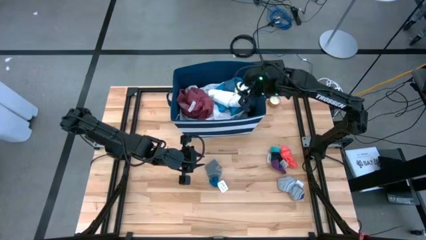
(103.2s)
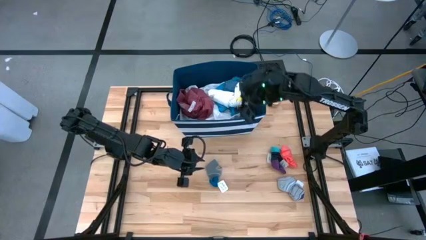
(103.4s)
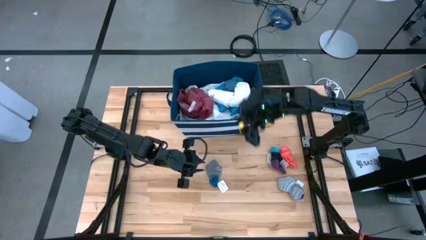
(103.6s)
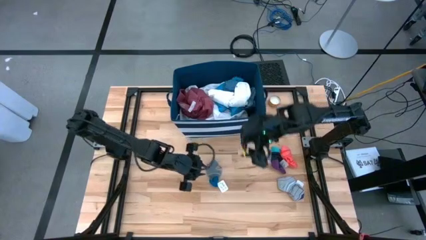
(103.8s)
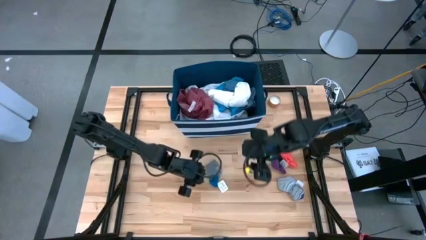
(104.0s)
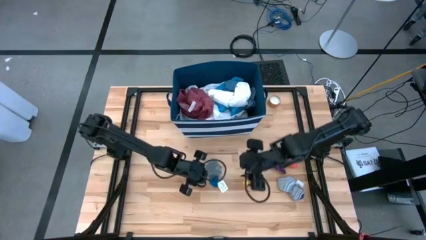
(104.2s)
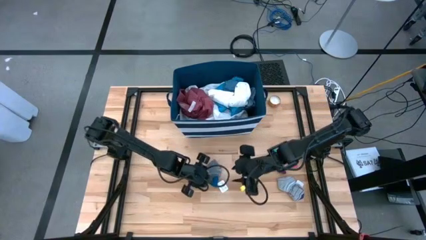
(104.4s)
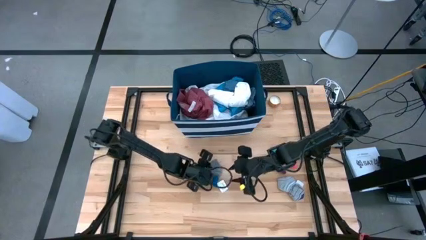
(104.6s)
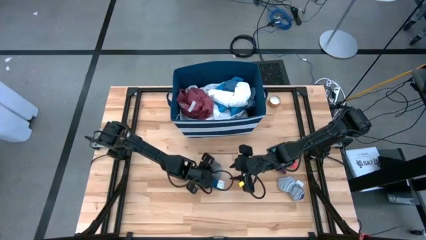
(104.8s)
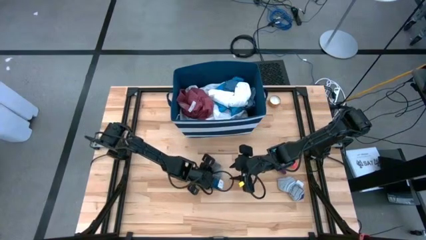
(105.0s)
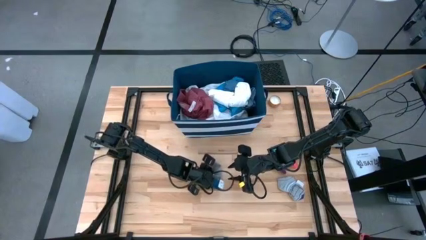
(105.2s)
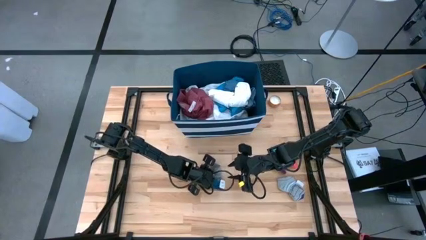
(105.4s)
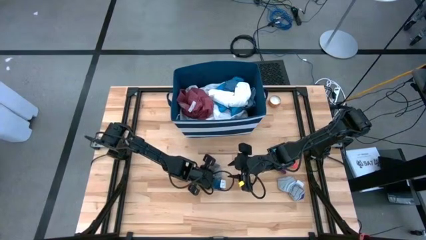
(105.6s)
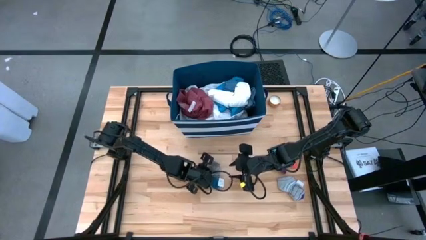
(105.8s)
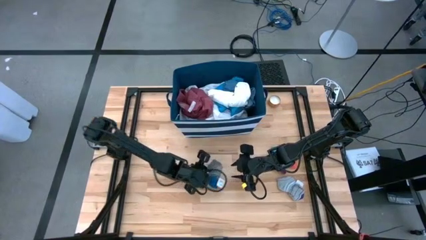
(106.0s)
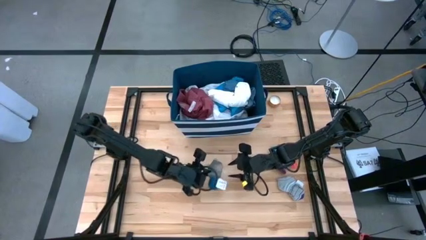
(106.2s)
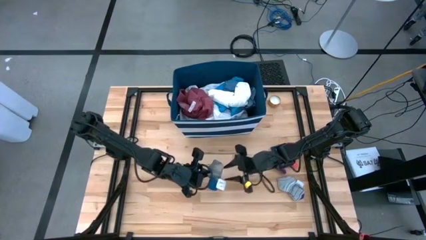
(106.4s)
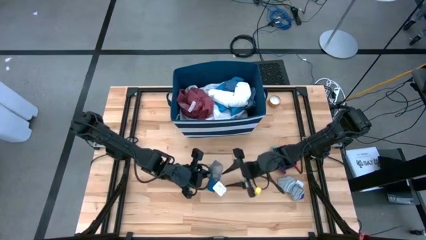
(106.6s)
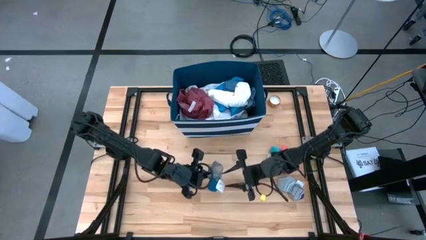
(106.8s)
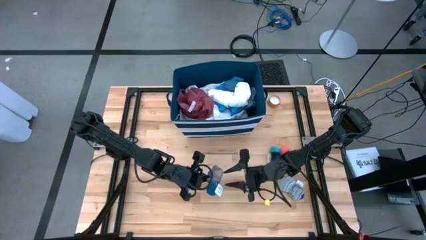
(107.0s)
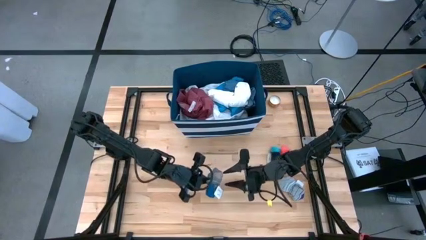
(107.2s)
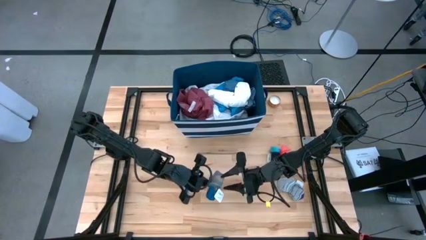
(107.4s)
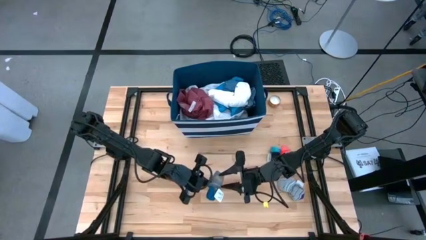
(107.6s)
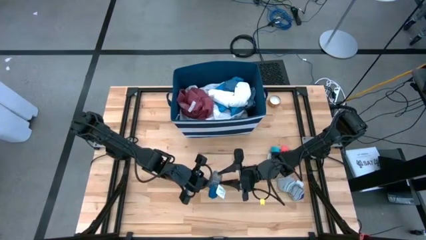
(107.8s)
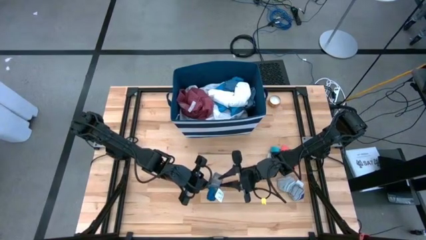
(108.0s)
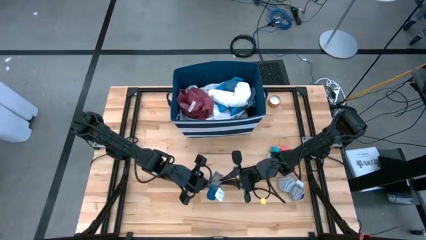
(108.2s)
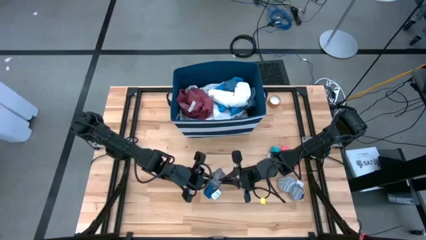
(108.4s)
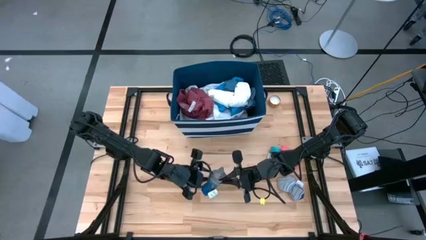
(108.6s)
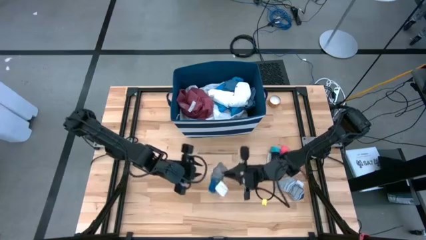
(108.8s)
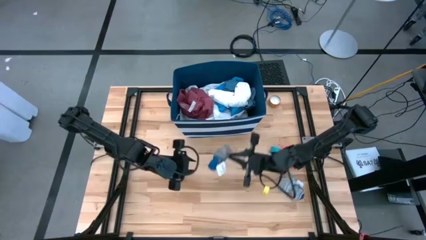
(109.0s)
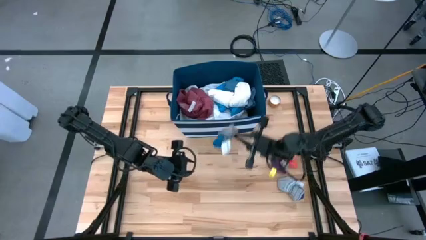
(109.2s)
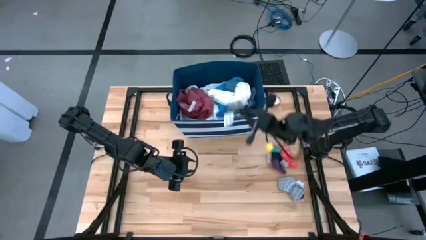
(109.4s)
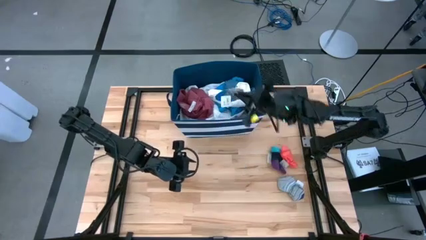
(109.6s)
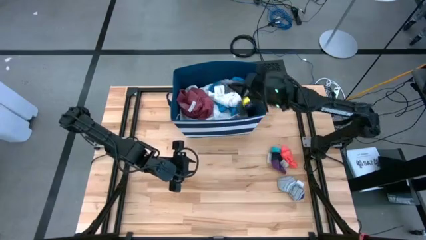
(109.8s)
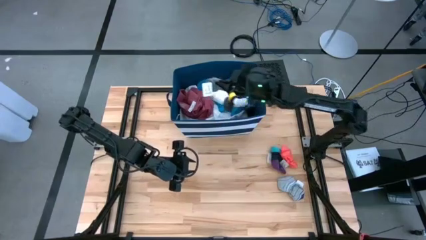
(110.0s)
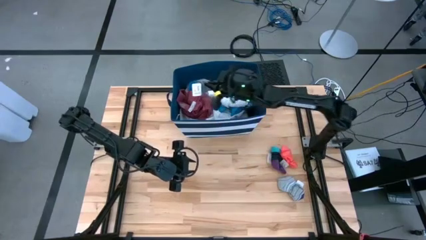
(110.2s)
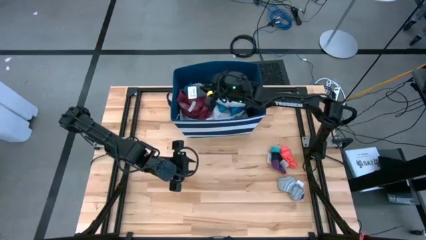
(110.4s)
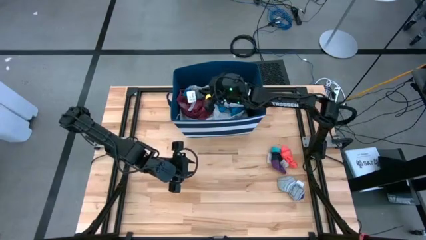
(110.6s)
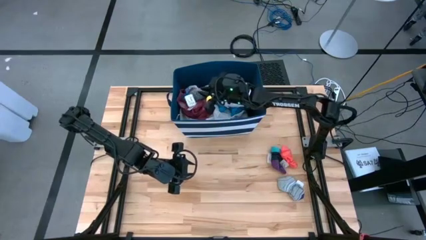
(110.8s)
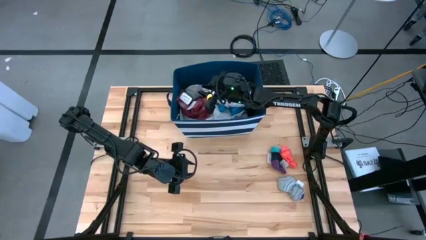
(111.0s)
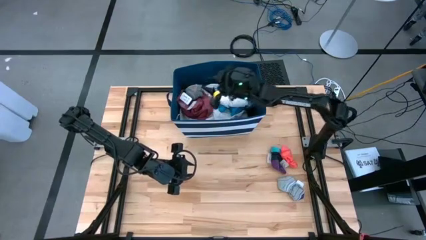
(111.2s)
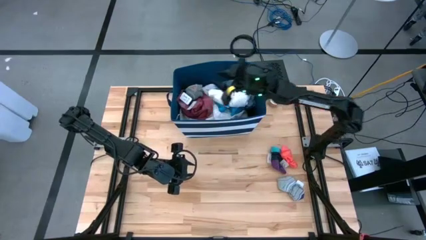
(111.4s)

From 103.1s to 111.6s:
Task: Sort clothes
Put the blue sock into the blue bin

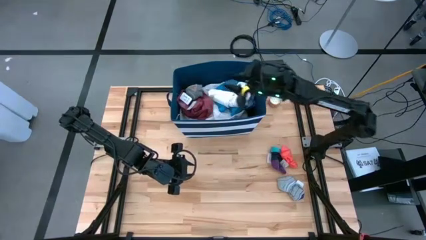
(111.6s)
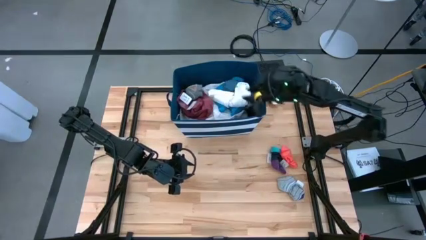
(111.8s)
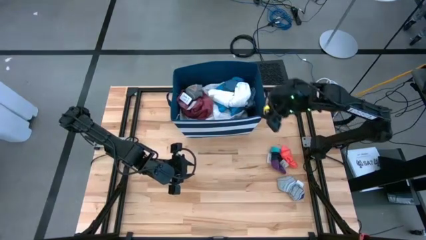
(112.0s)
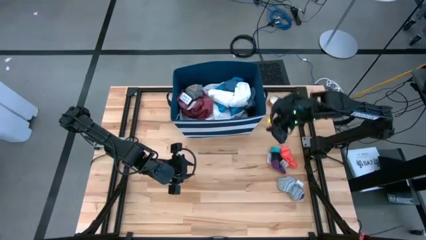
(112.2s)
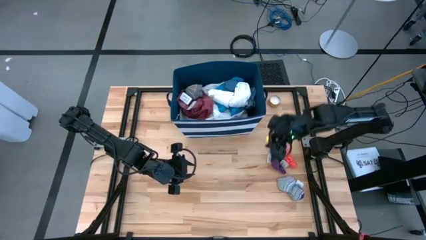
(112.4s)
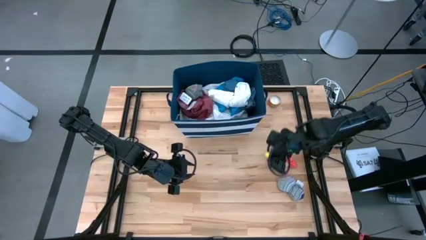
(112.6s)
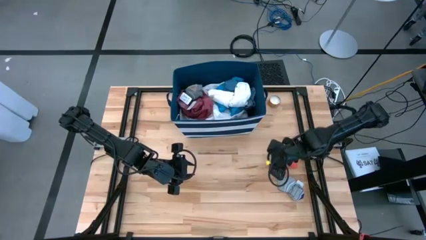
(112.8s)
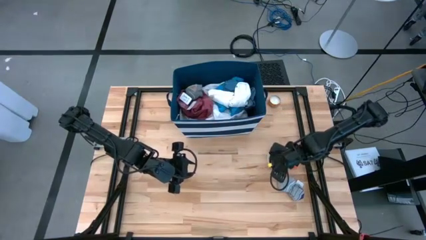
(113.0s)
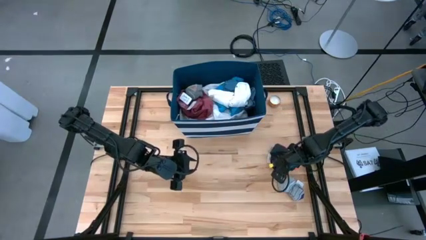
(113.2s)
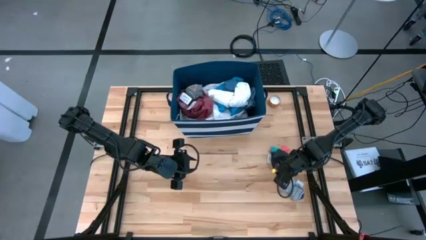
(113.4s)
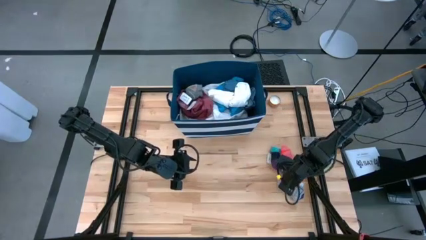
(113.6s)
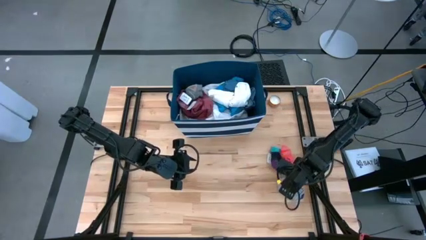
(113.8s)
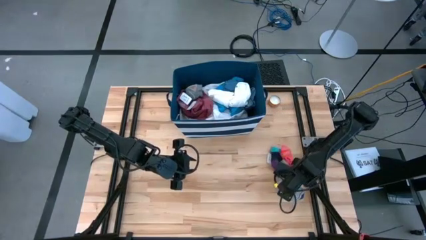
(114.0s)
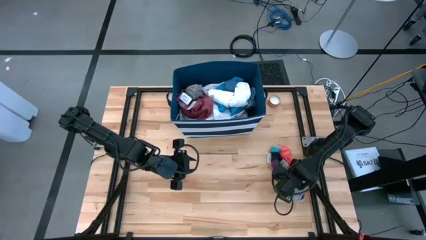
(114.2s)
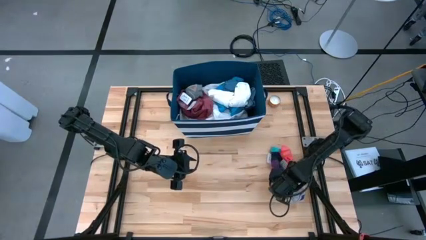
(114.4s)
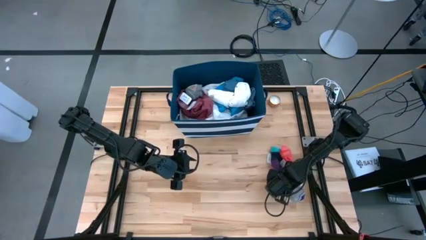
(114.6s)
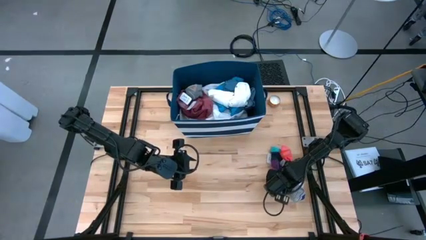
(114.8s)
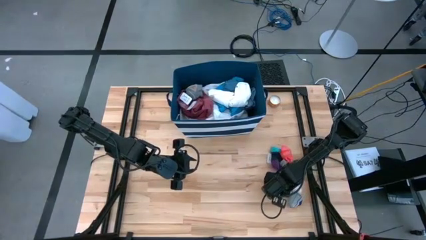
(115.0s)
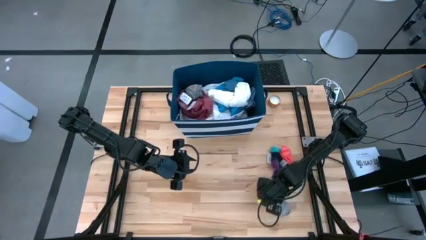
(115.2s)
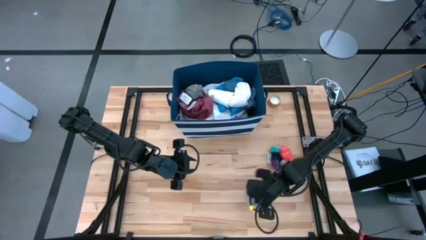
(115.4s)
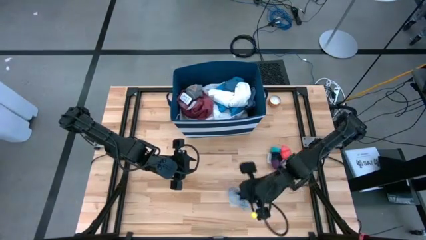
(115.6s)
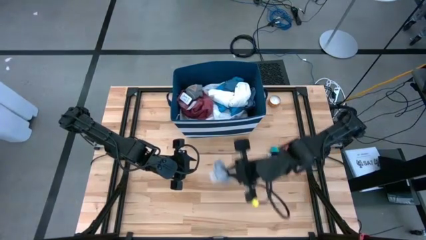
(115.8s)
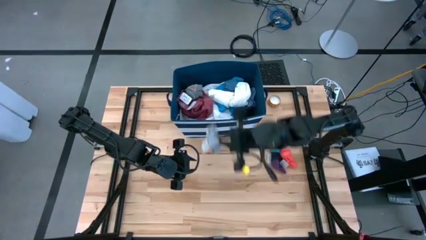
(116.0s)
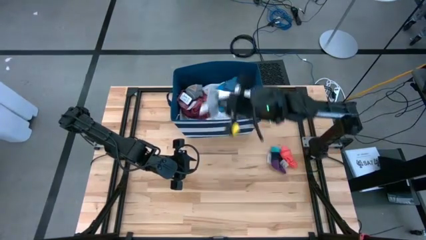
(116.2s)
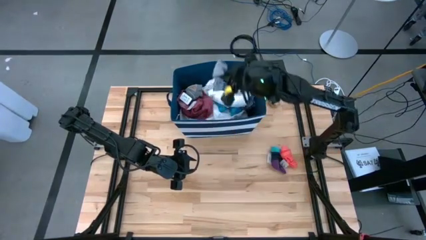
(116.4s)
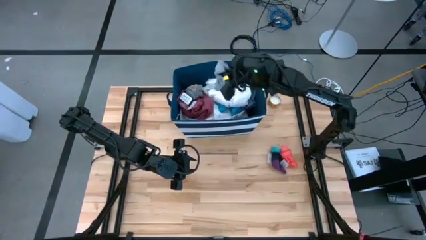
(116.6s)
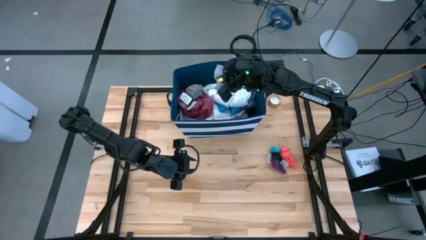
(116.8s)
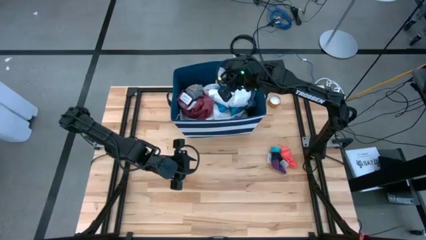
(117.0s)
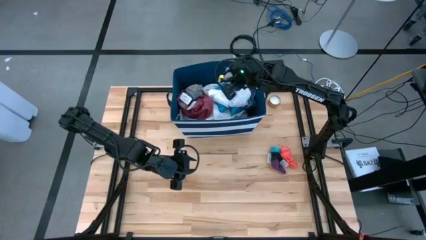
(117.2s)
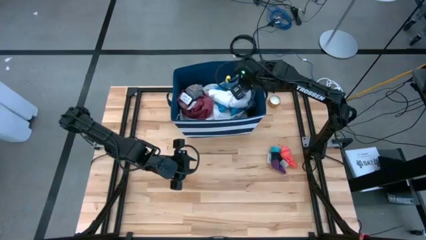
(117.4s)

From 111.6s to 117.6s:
Put the gray sock into the blue bin

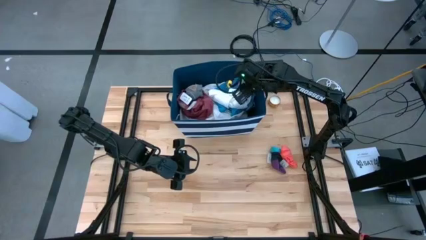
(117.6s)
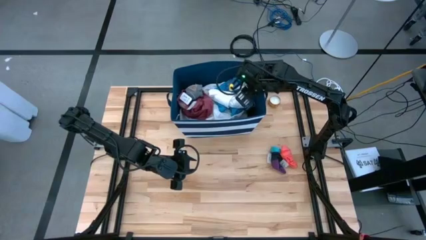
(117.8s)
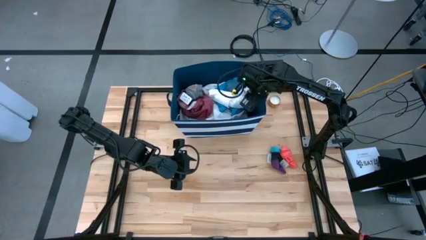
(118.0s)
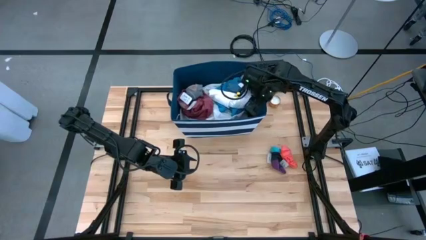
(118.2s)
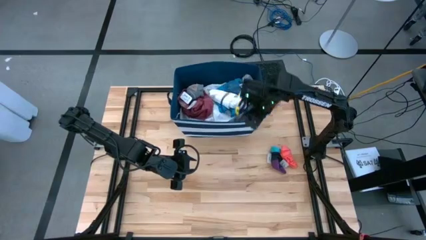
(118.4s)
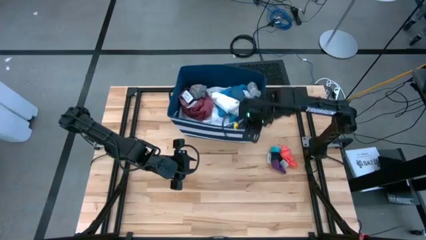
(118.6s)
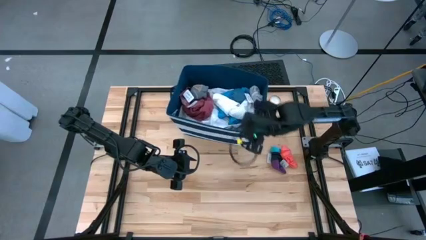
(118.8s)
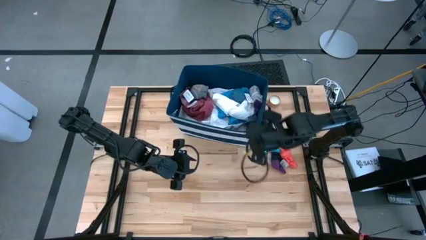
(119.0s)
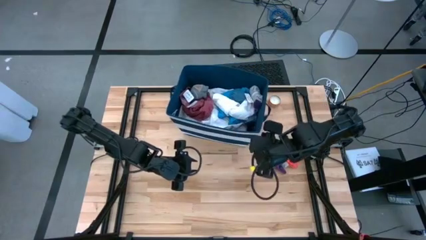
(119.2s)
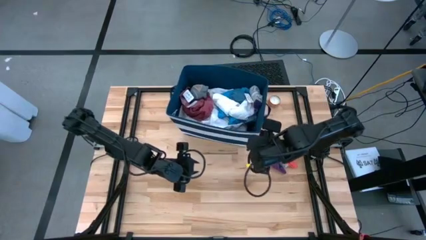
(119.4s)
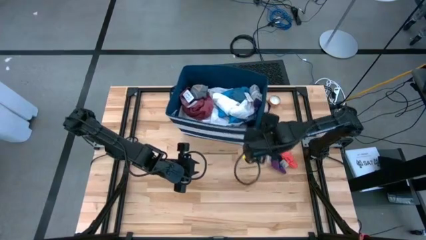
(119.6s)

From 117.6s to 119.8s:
Adjust the blue bin
